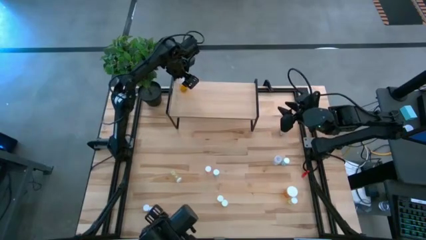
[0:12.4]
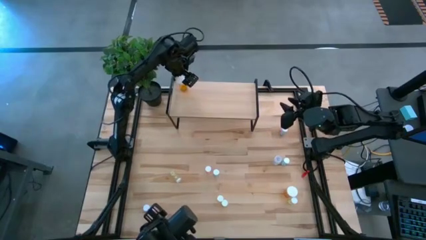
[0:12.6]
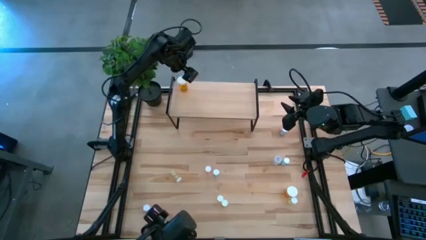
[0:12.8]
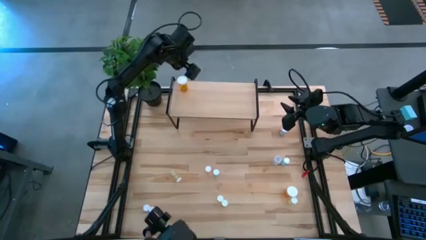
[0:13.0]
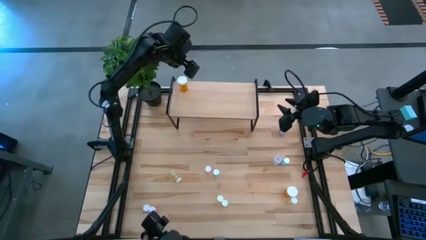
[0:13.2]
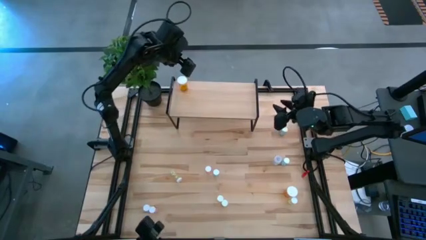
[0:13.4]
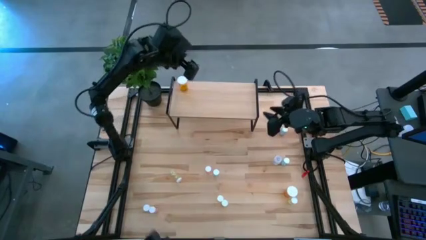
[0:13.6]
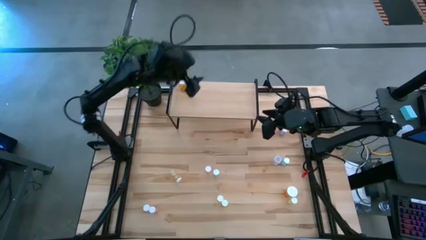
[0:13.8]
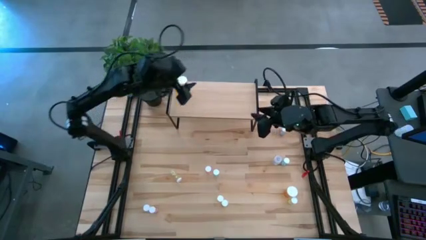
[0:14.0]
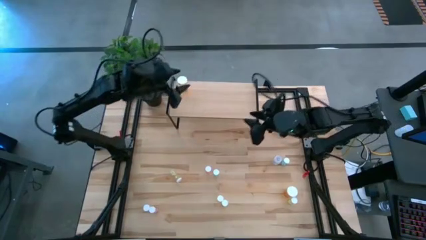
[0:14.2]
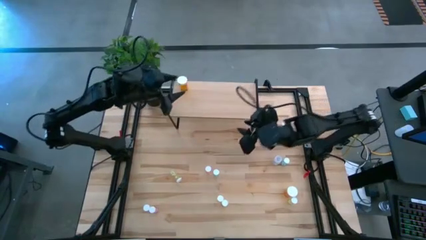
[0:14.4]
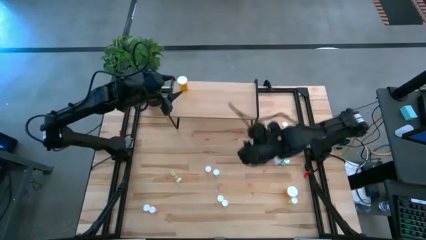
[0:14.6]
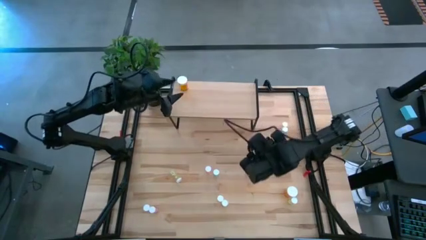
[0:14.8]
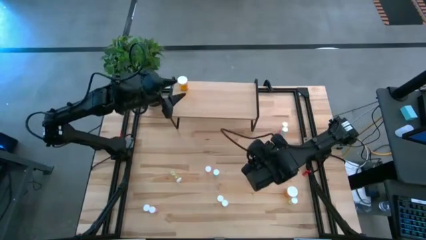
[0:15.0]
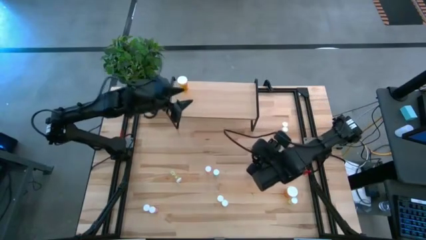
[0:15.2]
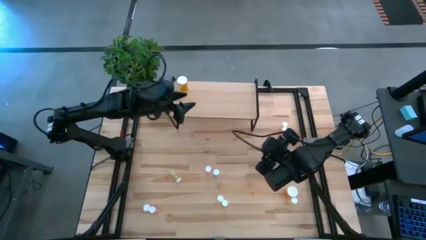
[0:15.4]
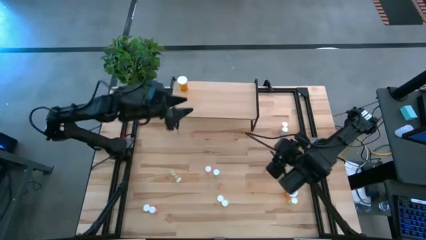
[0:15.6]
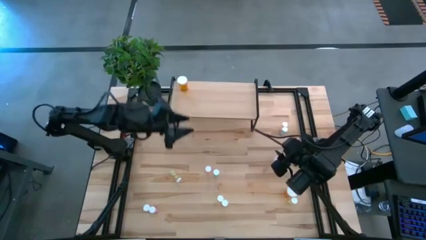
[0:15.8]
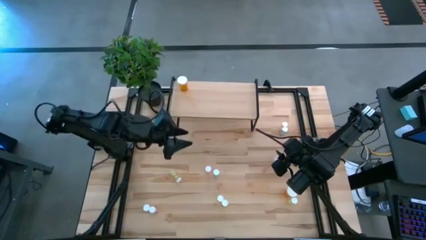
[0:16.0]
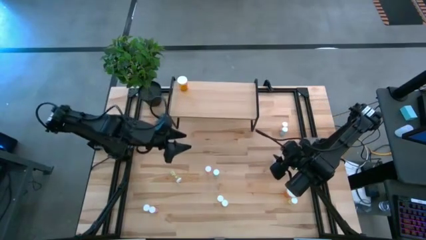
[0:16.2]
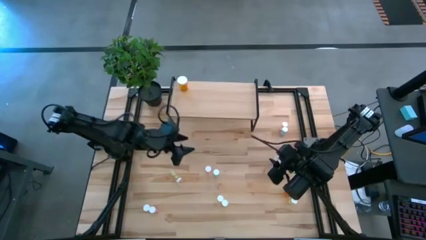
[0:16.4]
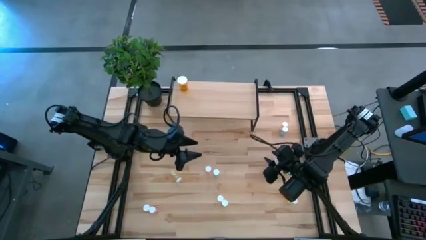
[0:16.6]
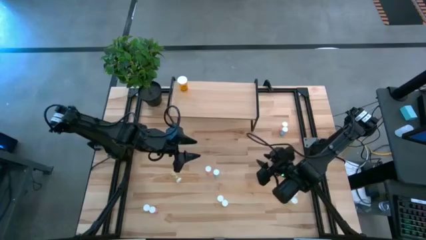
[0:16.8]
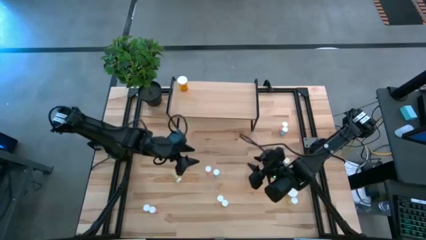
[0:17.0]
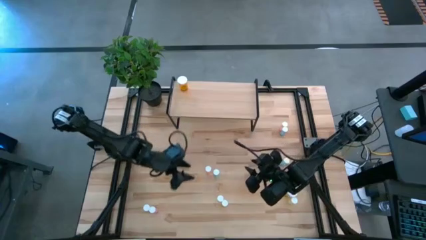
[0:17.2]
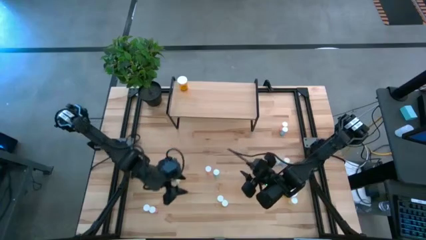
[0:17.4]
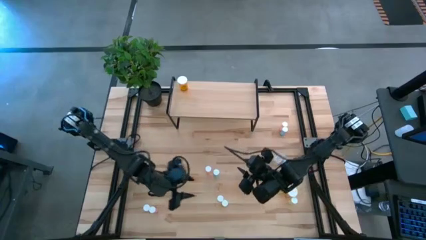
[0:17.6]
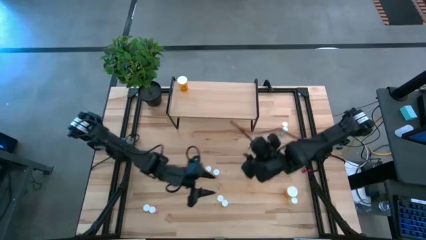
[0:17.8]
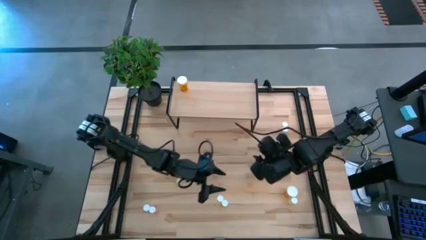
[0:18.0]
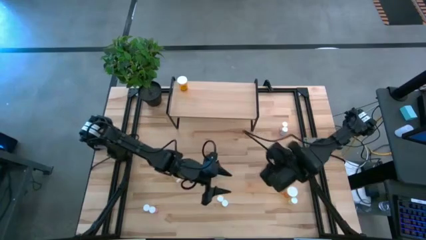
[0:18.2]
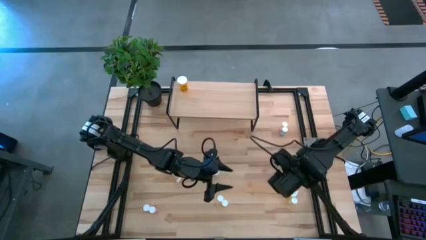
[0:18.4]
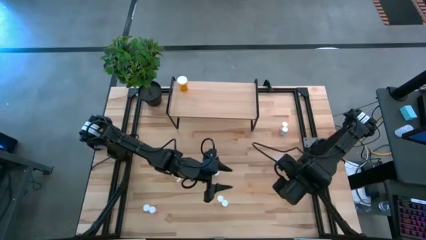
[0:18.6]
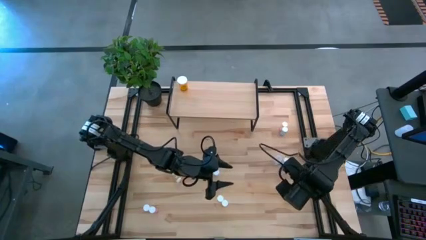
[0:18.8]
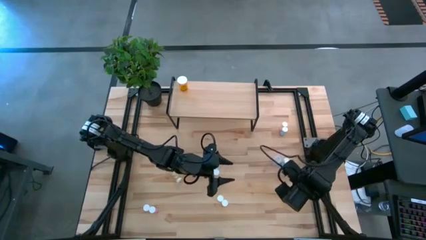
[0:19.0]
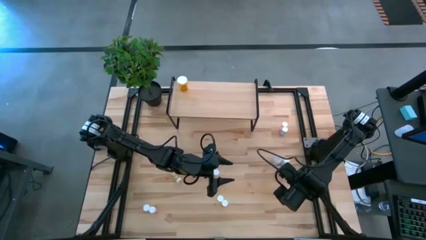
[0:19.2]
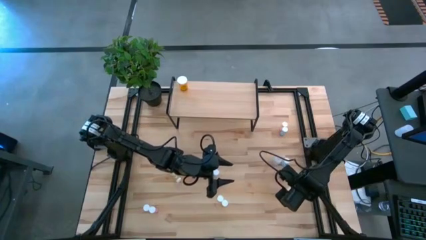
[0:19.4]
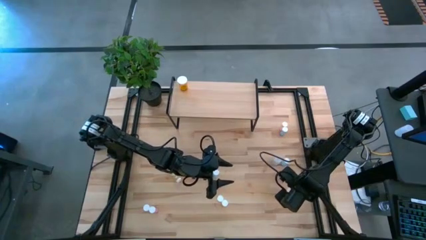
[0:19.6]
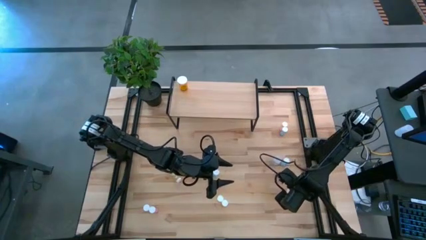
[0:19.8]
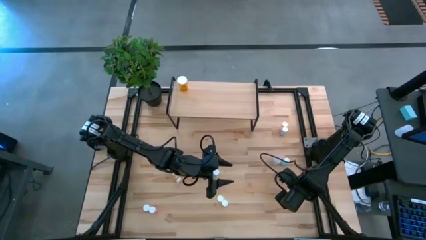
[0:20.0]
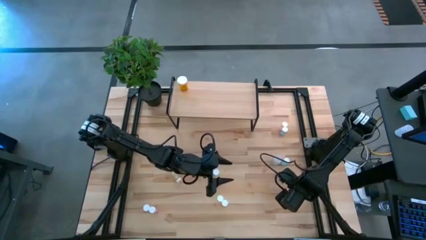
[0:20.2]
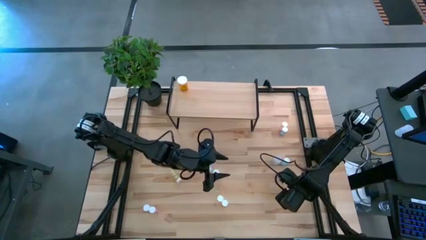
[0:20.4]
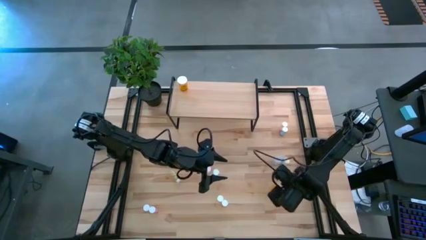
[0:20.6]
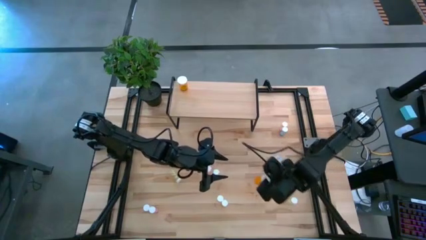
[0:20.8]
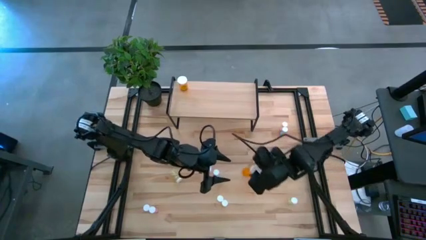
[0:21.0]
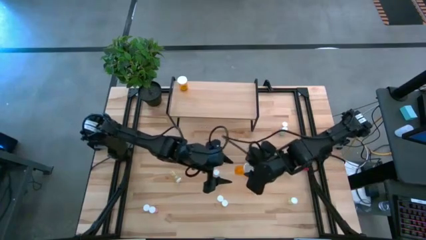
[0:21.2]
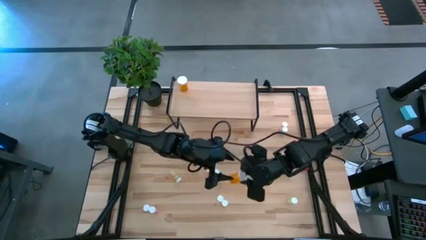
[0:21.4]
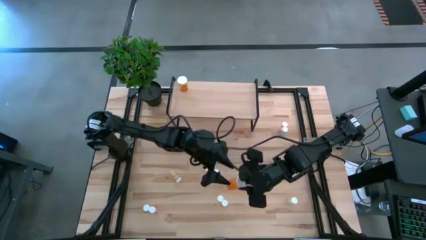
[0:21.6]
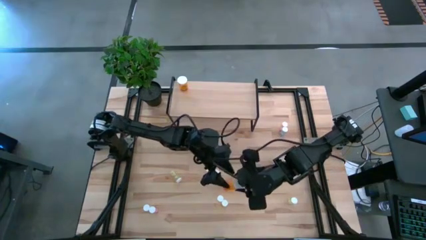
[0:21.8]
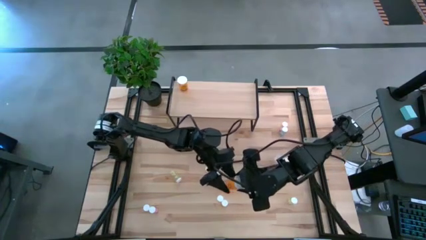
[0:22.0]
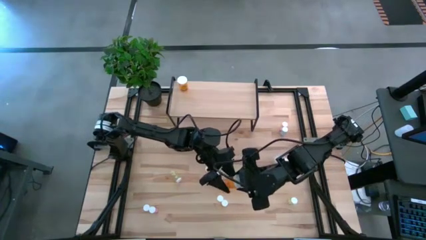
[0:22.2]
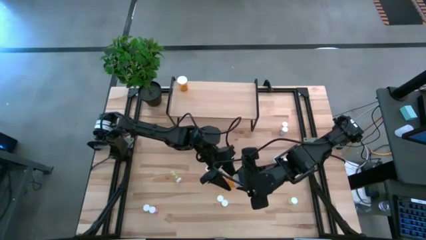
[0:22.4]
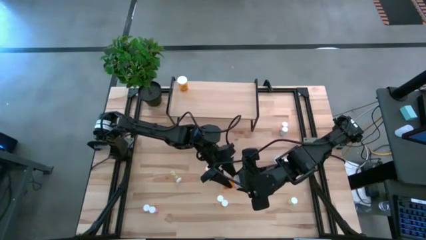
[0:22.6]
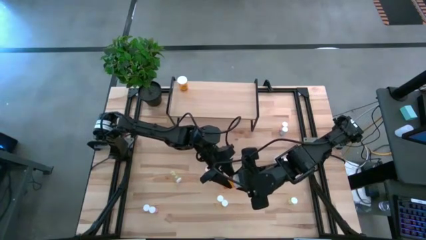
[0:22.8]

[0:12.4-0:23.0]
Task: Pick and place medicine bottles onto shelf by color
Put the orange pill bottle on the shelf

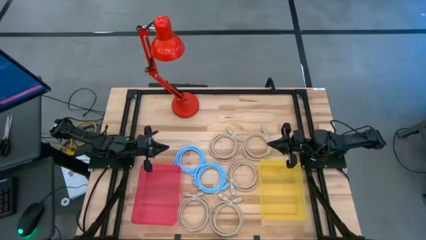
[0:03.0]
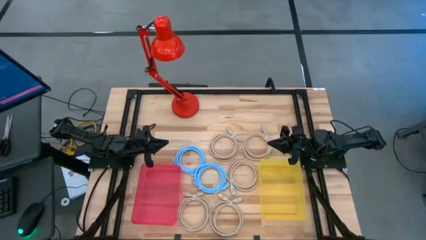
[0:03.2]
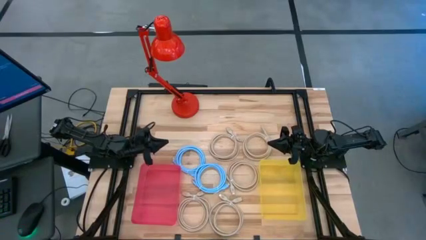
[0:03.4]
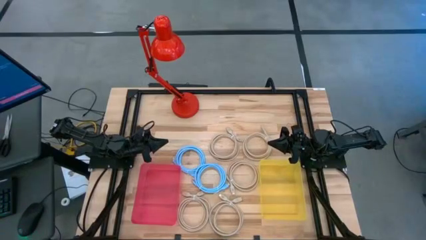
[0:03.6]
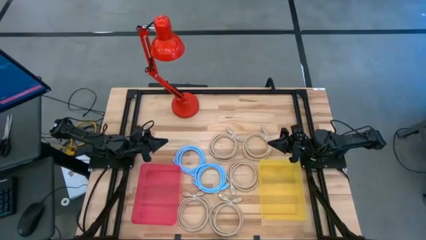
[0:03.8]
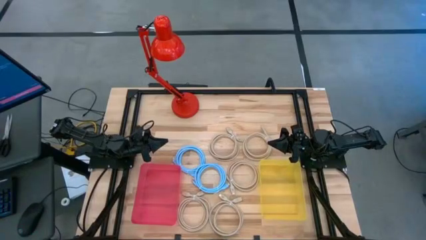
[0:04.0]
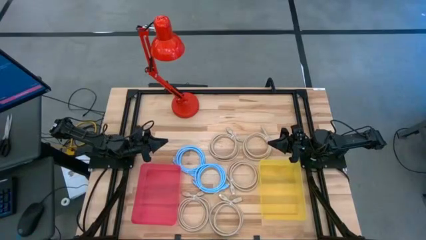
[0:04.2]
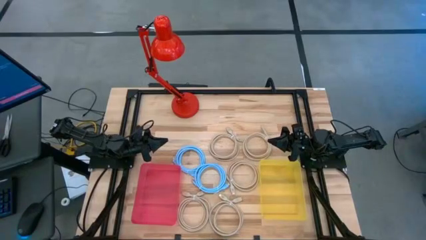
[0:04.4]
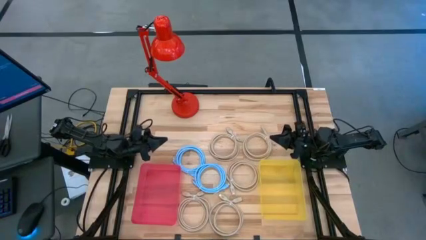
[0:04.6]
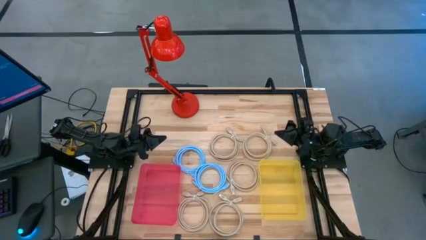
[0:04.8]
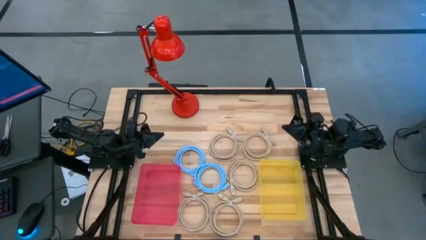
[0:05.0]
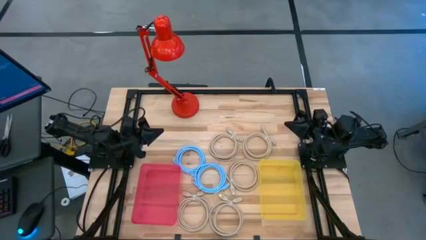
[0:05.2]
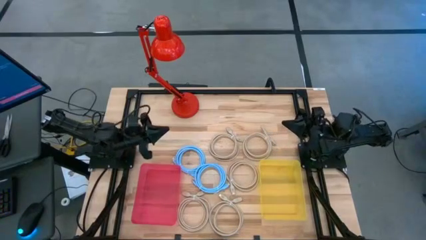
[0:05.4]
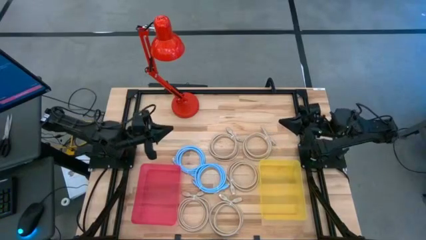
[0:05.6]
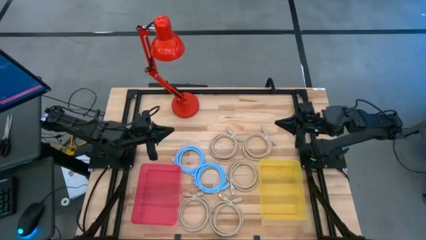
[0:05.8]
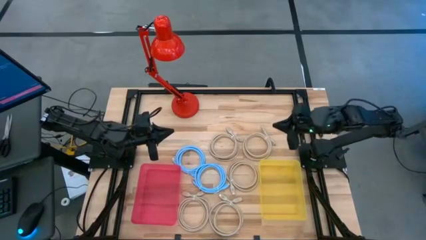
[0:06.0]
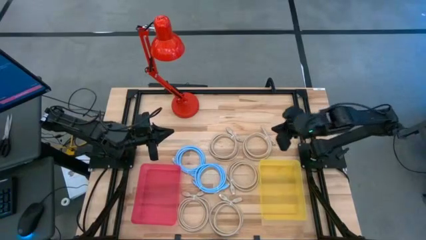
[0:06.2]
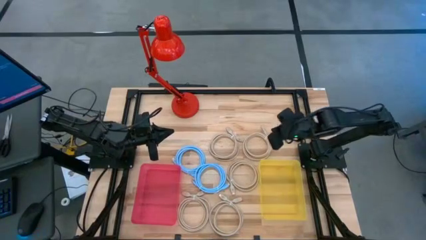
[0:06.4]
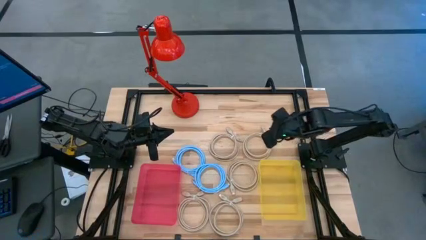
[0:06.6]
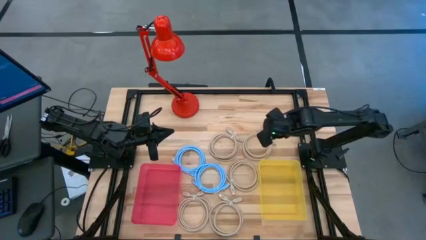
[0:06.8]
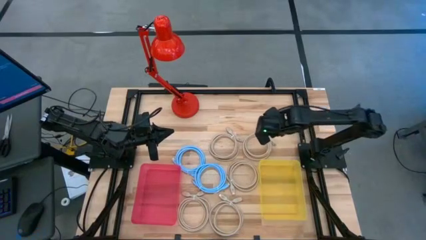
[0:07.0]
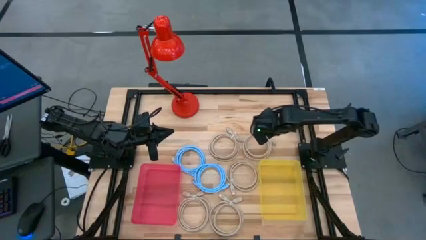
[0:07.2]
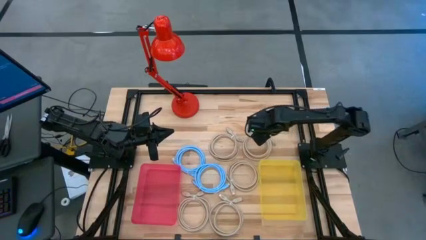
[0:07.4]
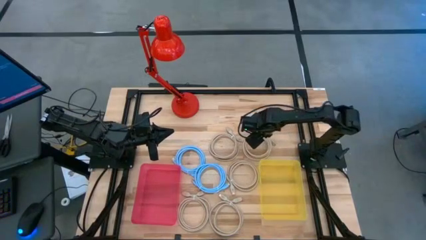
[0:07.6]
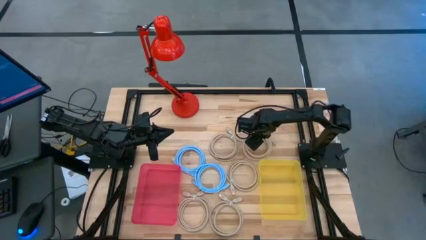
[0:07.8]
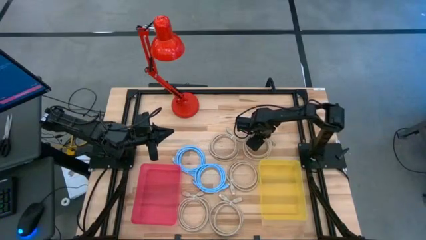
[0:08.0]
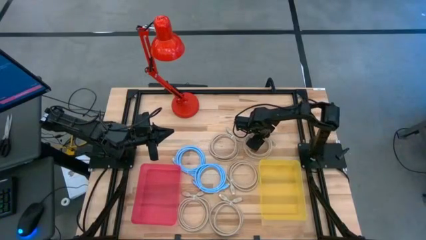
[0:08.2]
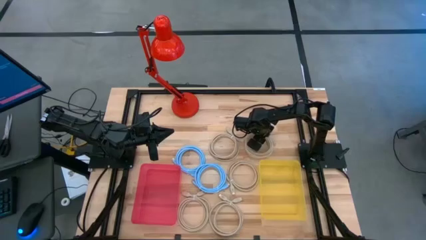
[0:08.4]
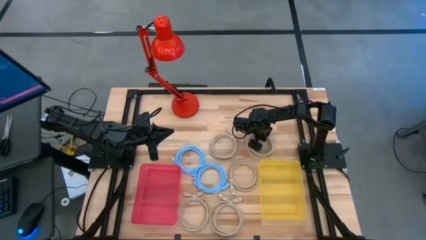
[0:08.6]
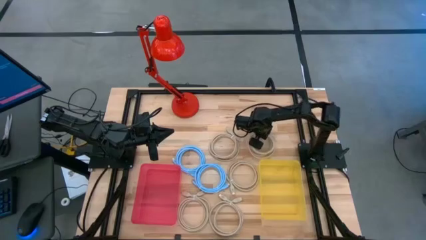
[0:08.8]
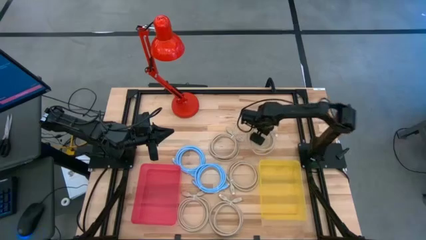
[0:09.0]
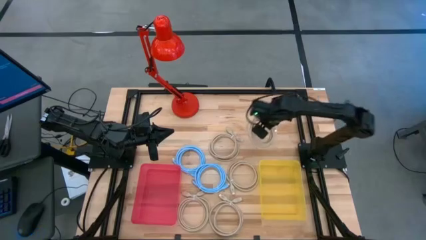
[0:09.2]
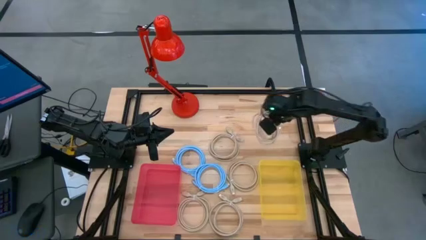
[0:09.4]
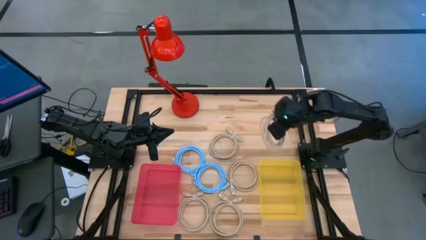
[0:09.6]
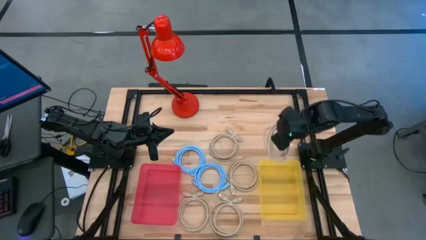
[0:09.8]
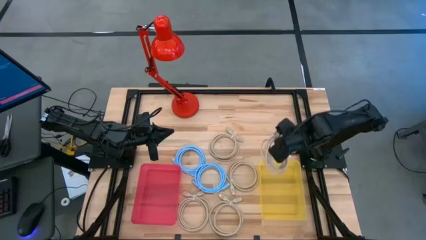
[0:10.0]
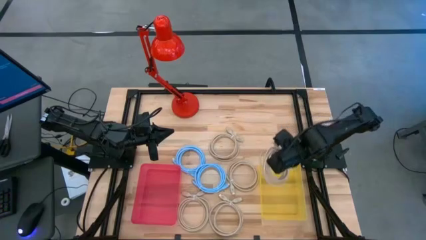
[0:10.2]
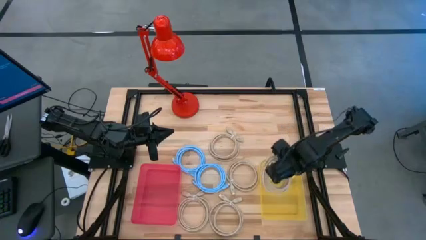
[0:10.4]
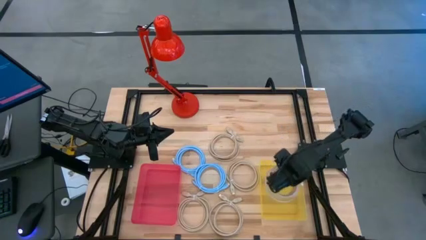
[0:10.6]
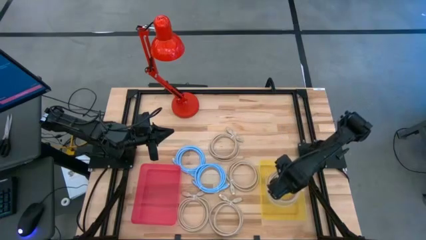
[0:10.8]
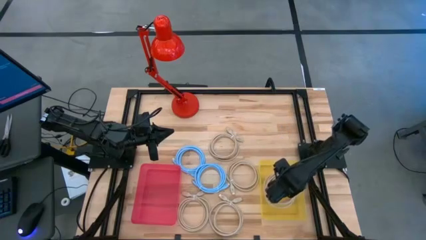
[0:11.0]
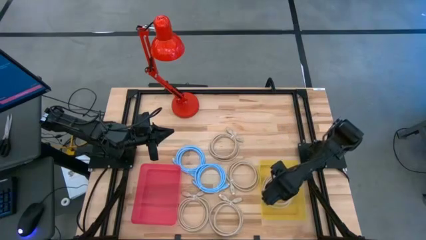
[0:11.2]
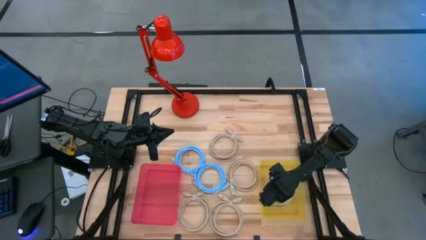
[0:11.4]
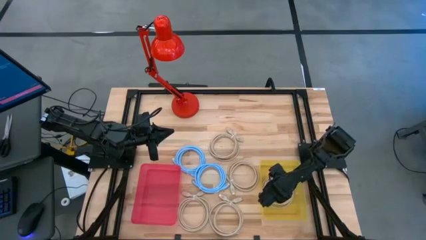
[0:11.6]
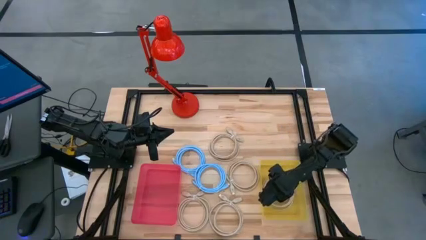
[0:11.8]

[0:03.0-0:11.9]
Task: Pick & Place USB Port
Put the light yellow charger cable into the yellow bin
